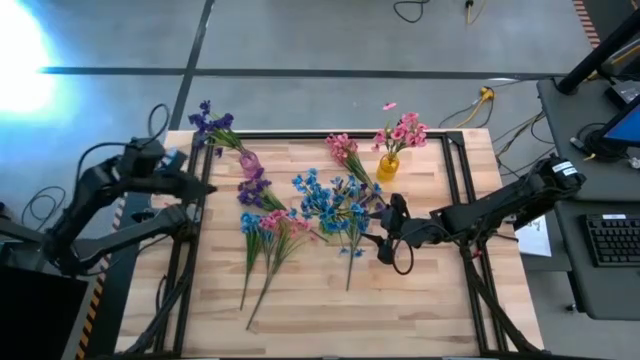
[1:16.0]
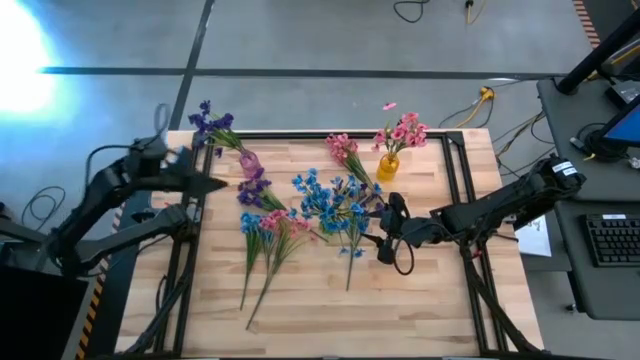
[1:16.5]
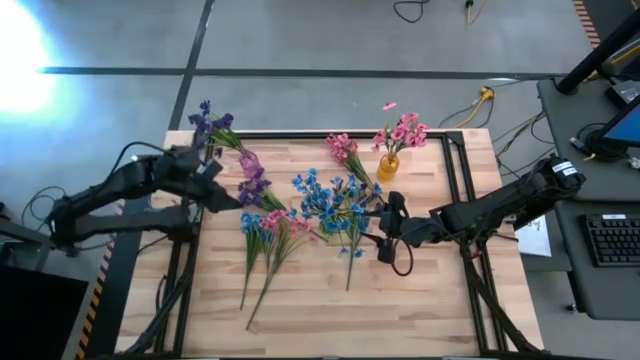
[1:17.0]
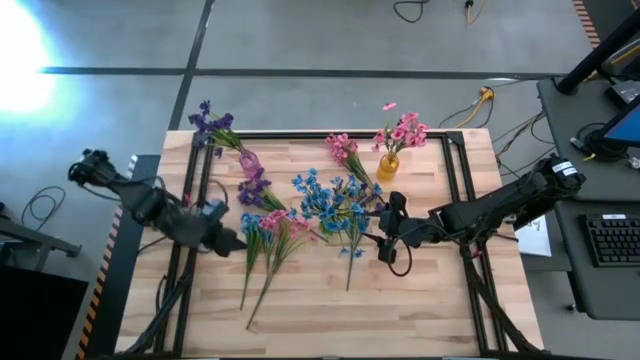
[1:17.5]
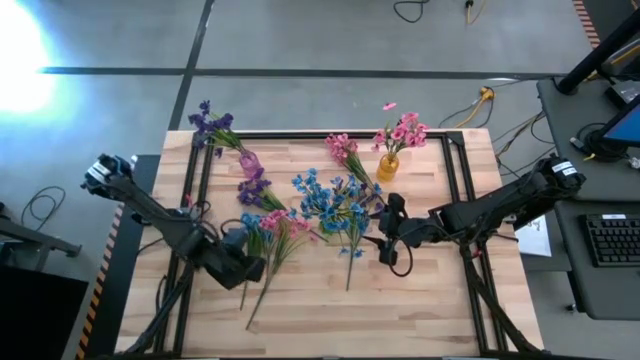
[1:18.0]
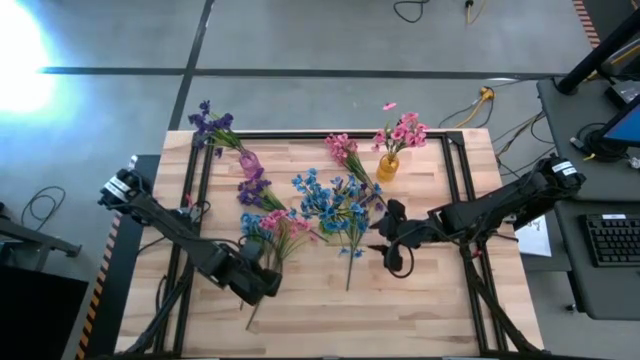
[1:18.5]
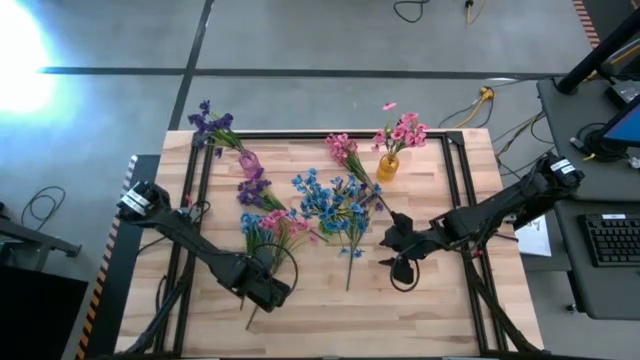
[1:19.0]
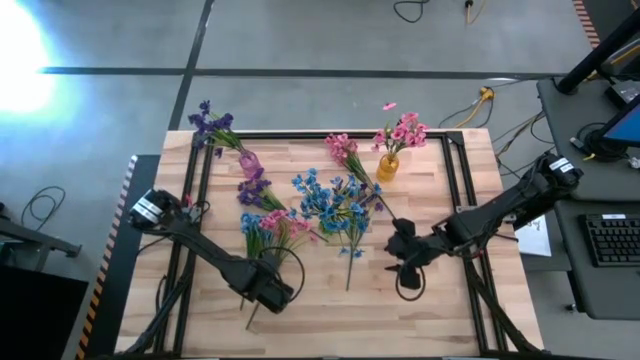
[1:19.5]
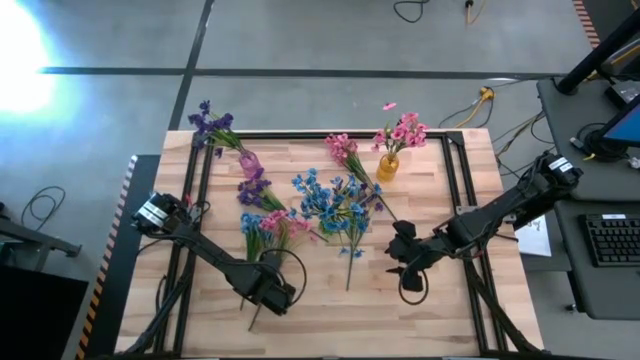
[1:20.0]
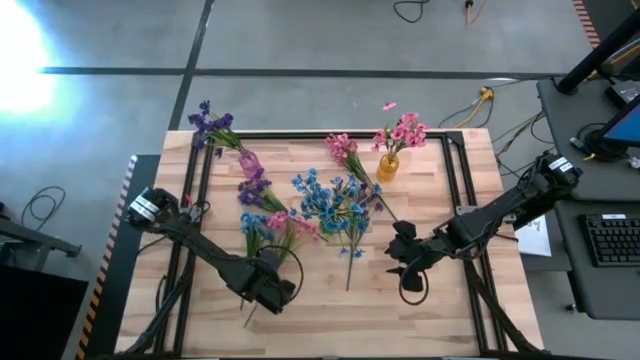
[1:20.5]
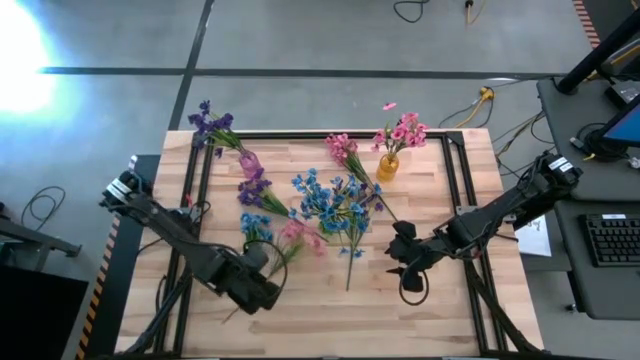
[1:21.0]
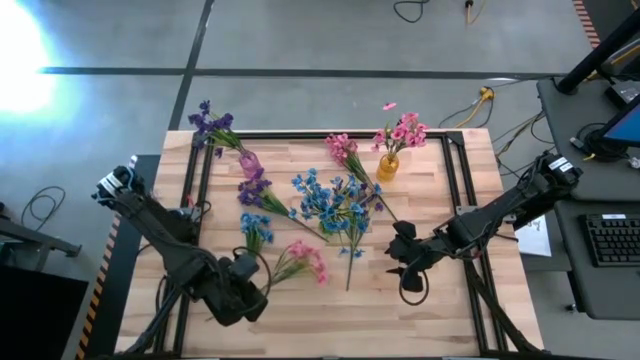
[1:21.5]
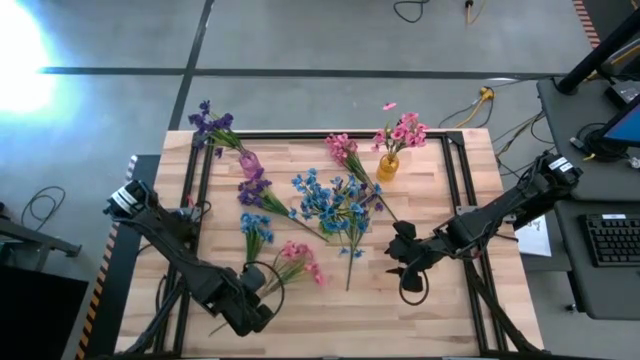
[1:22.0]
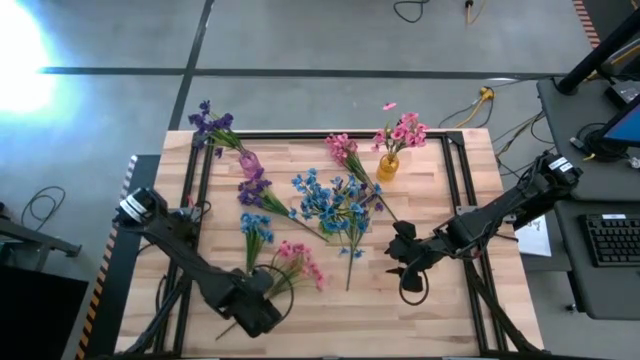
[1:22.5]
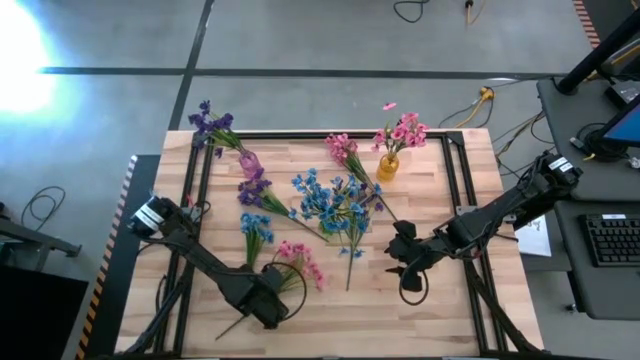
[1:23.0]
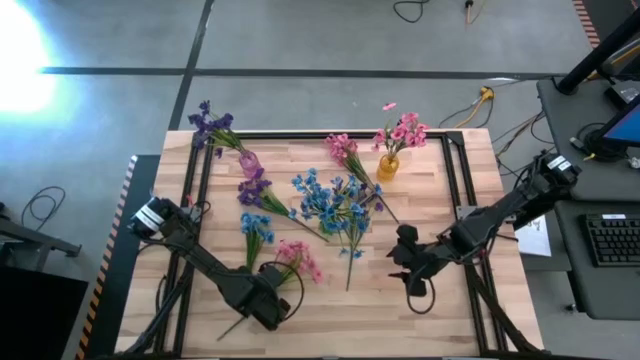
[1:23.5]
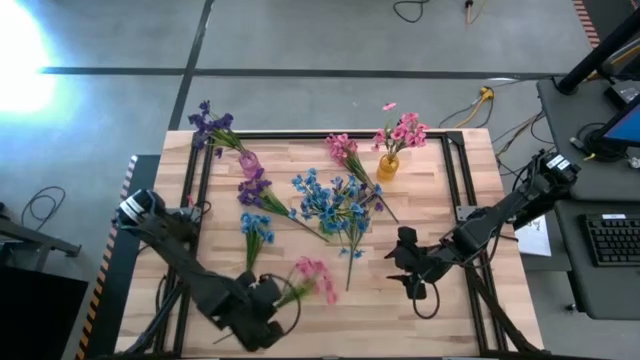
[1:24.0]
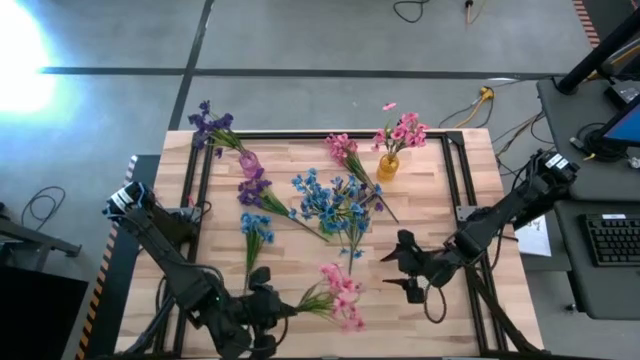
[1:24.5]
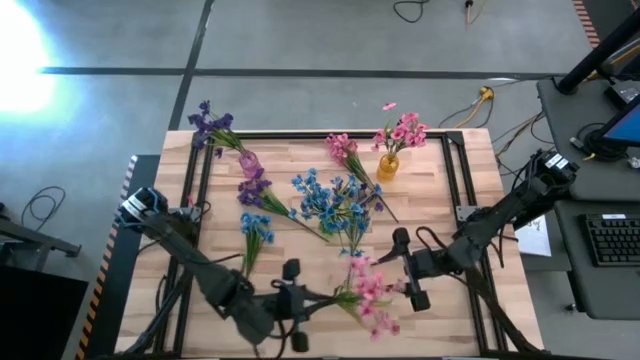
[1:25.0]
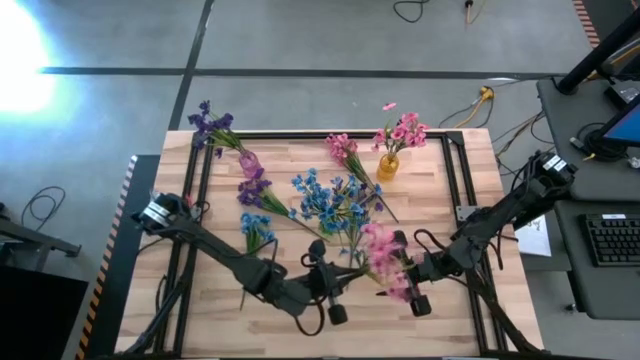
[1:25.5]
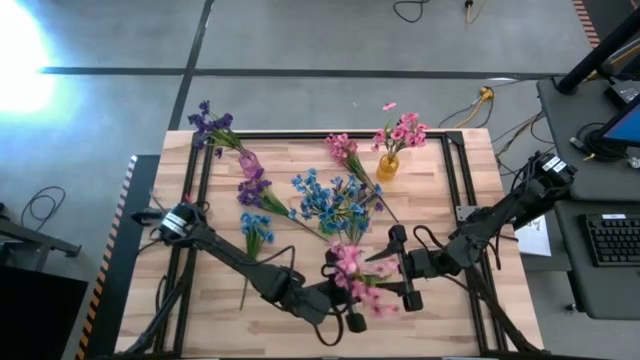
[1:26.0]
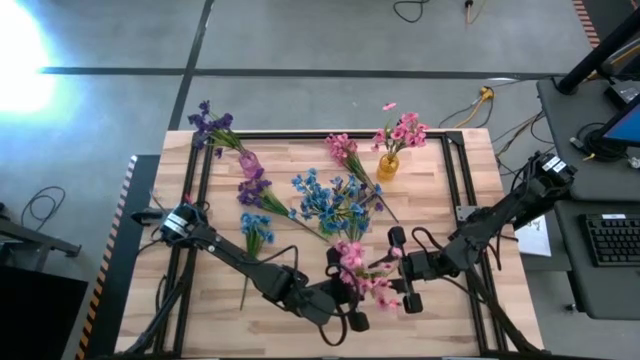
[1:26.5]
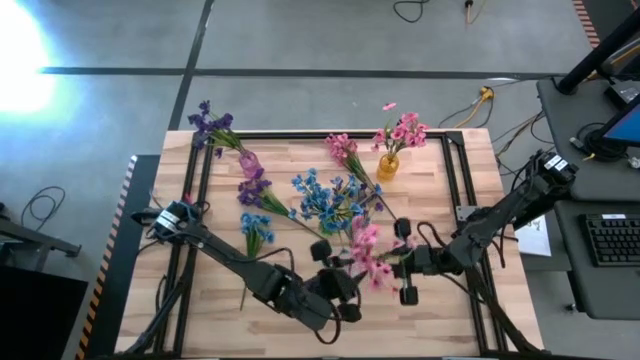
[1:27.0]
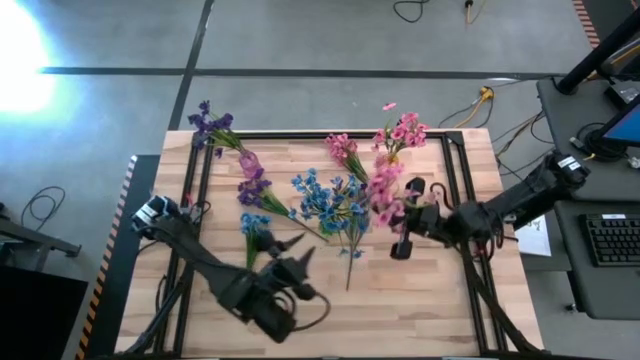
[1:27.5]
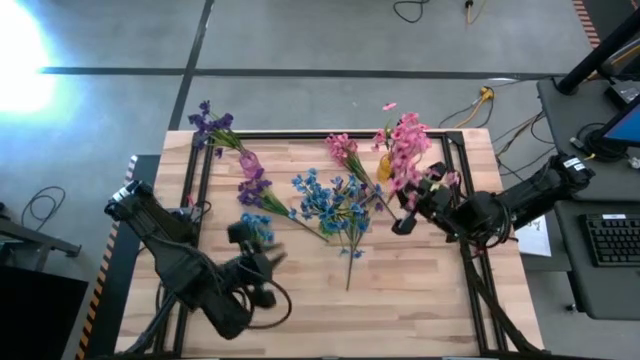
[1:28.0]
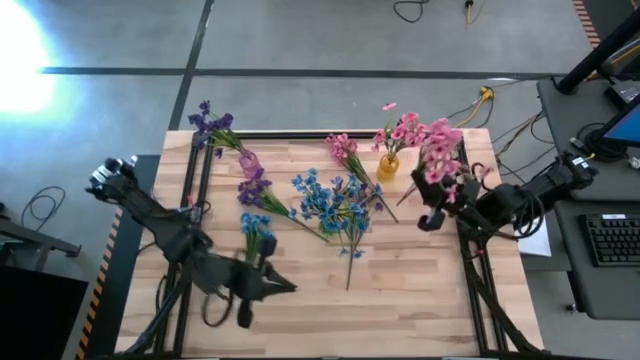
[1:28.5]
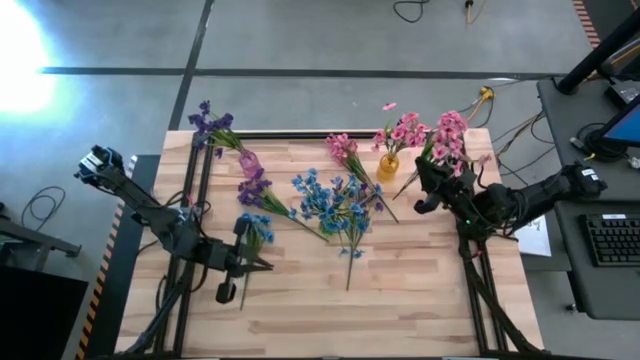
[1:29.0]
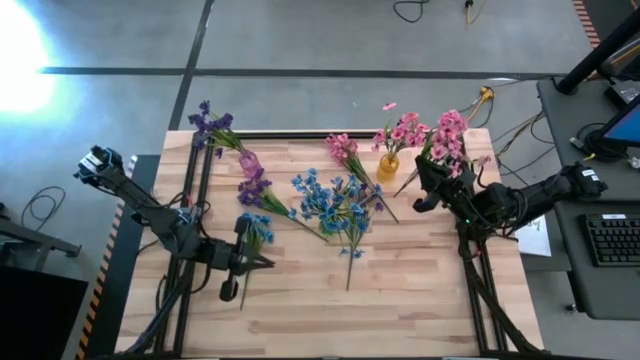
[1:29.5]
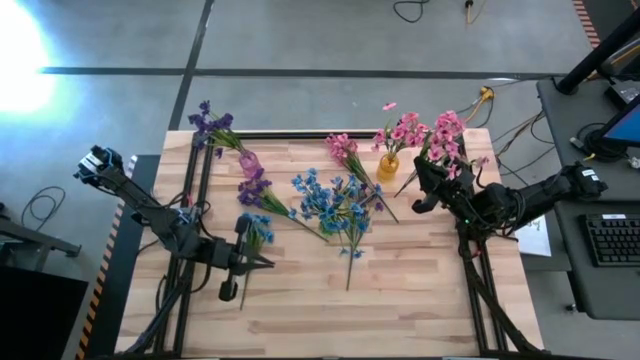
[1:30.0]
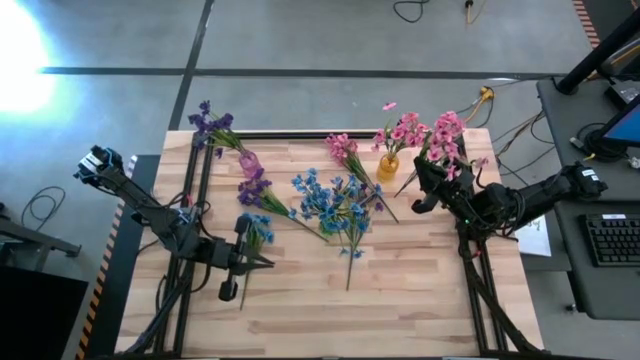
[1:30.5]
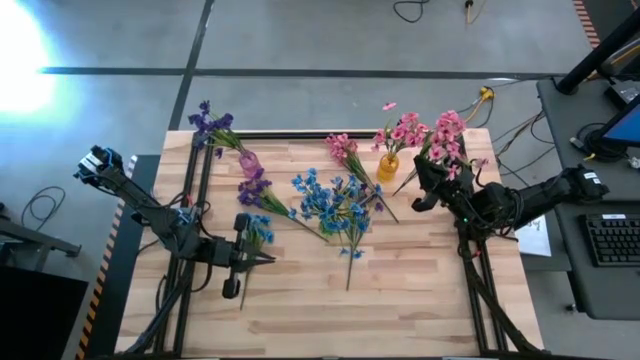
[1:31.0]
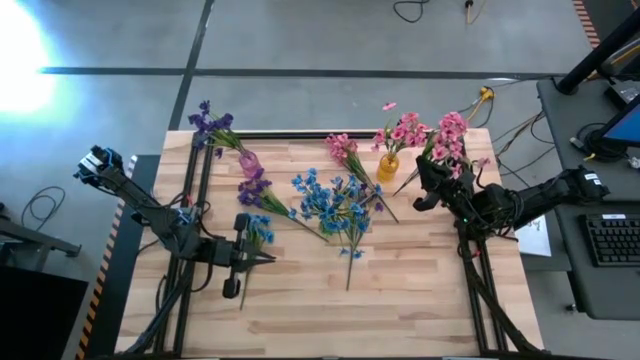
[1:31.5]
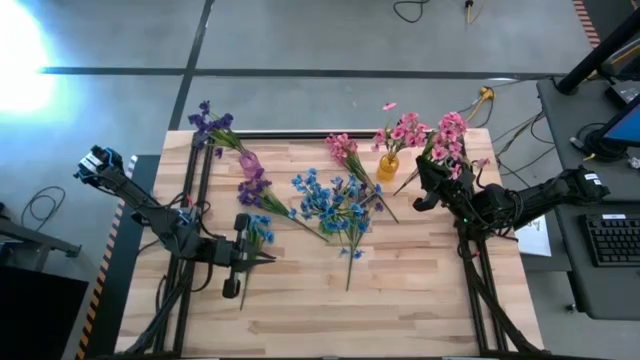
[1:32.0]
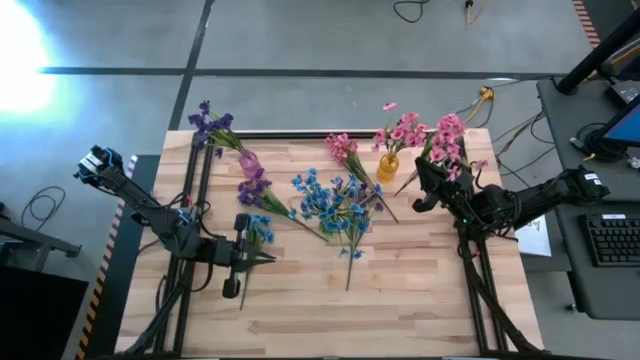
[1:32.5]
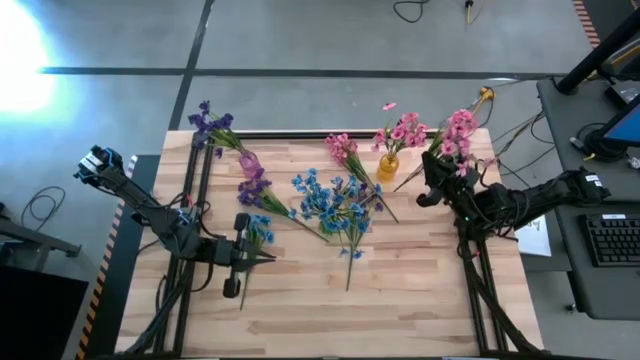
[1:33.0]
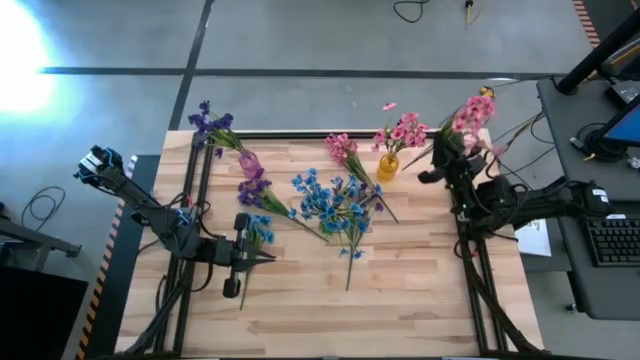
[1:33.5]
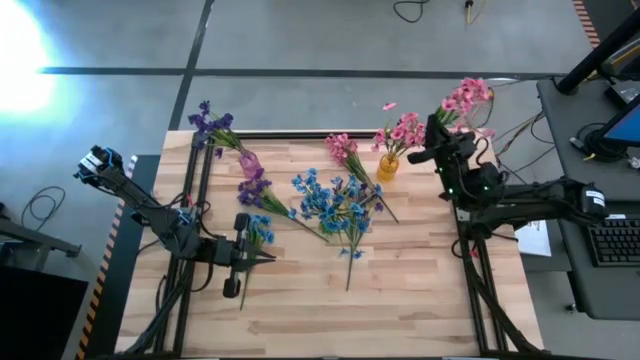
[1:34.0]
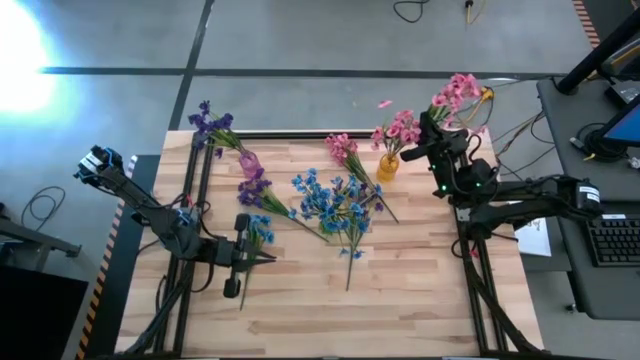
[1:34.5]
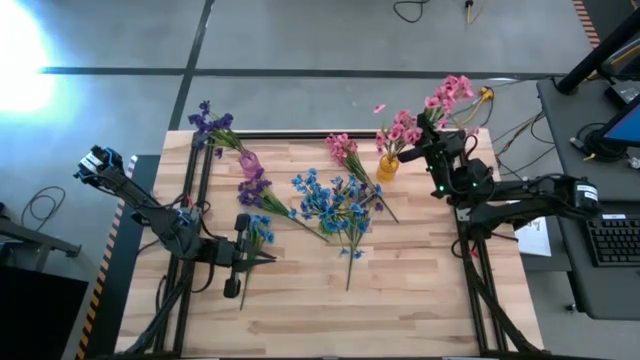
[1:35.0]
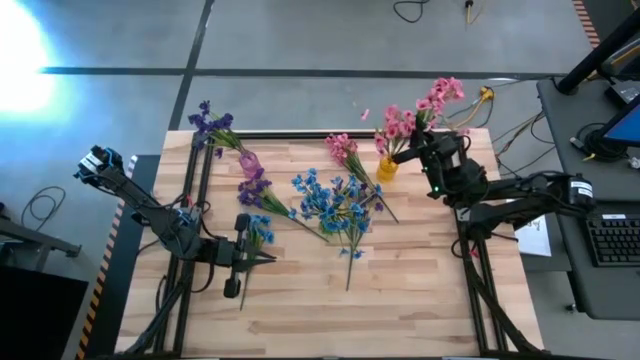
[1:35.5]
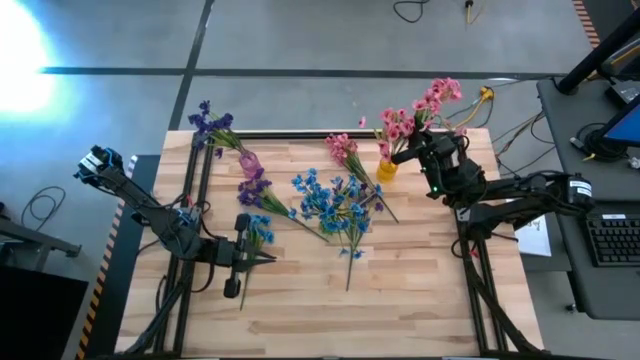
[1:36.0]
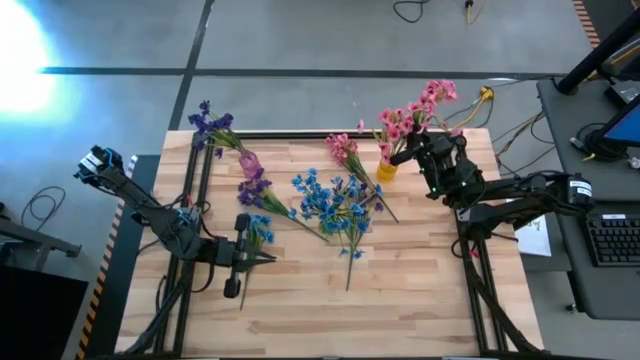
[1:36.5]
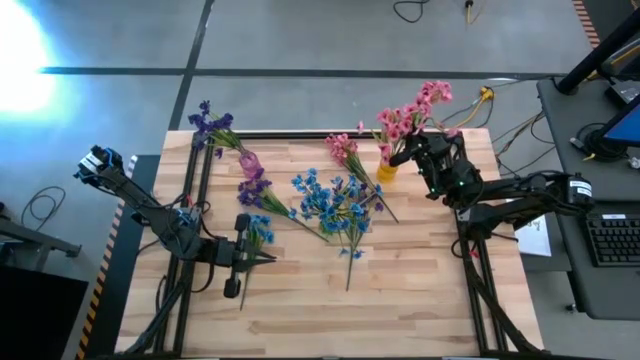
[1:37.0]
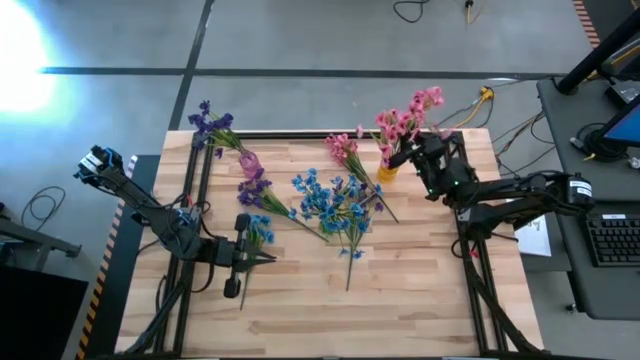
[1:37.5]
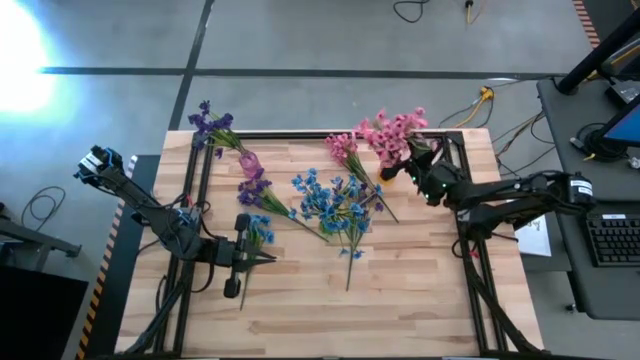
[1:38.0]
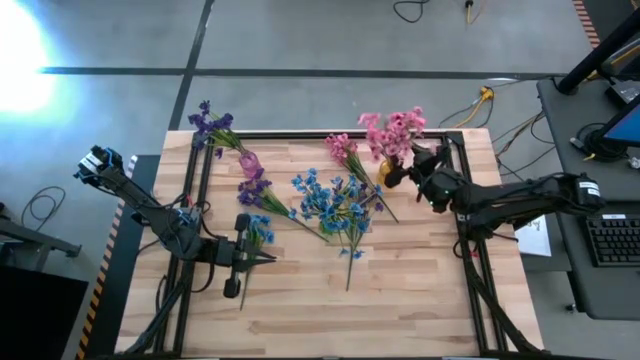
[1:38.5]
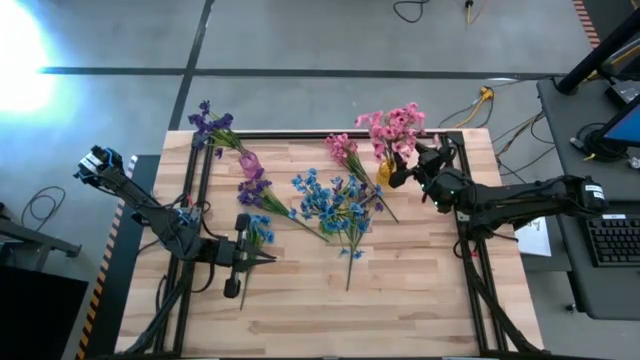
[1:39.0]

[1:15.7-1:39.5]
Task: Sort flowers into vase by color
Put the bottom pink flowers into the yellow vase
